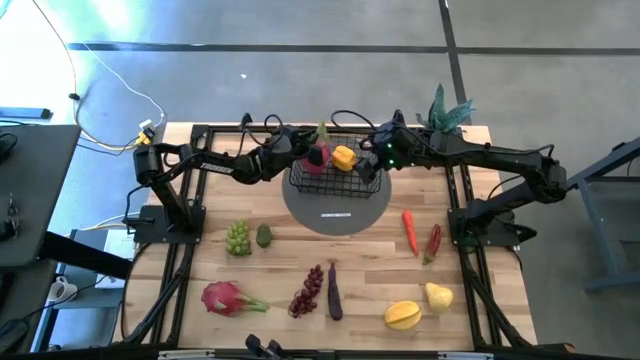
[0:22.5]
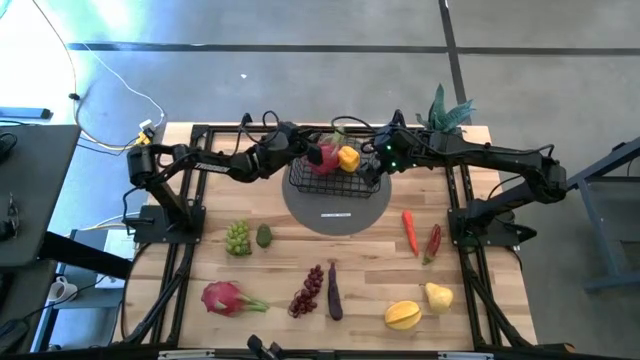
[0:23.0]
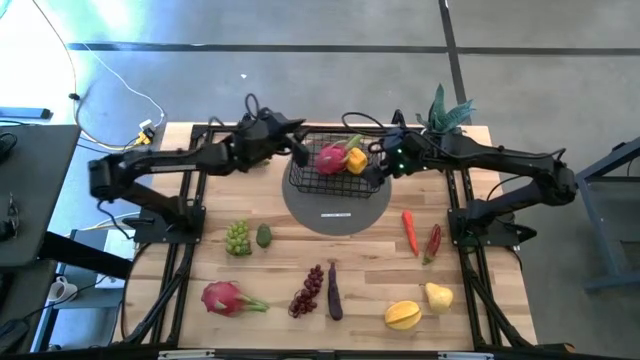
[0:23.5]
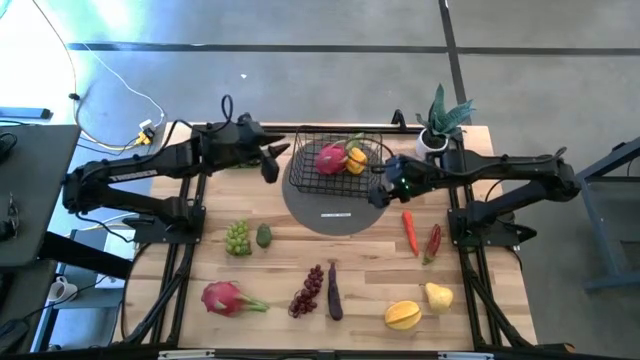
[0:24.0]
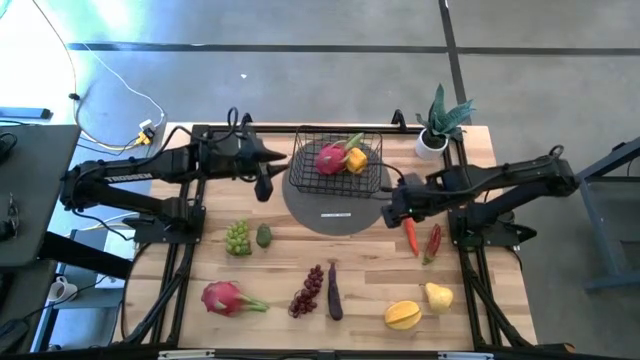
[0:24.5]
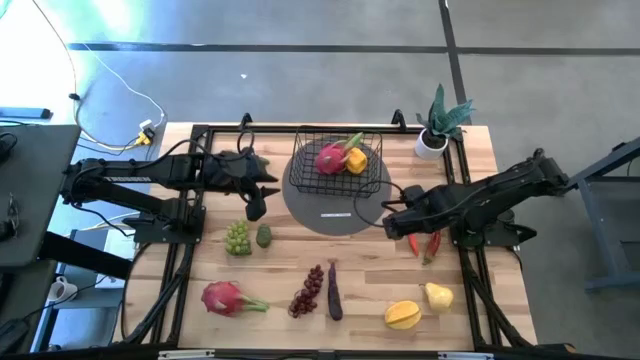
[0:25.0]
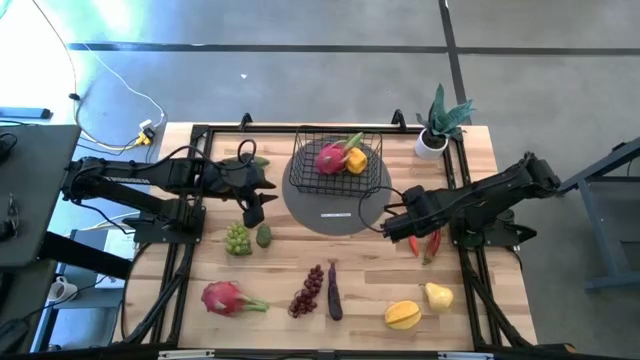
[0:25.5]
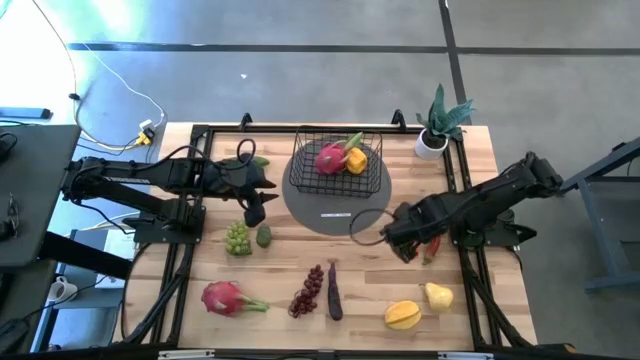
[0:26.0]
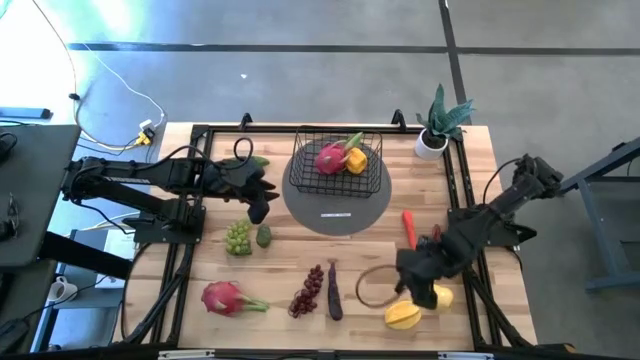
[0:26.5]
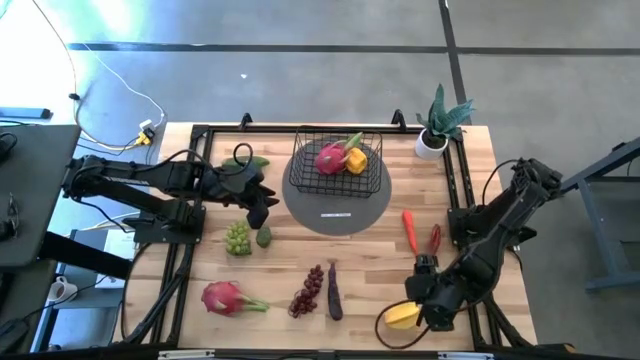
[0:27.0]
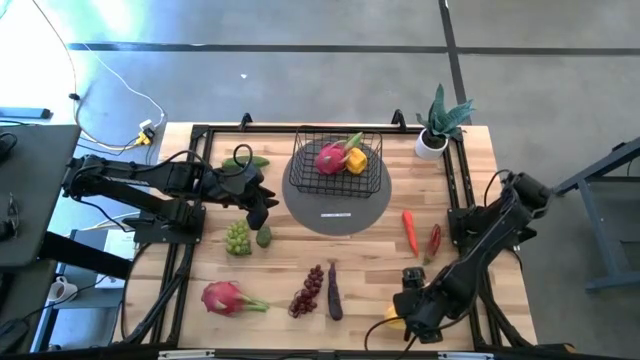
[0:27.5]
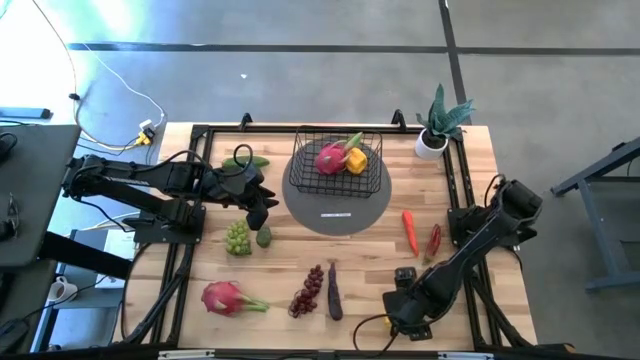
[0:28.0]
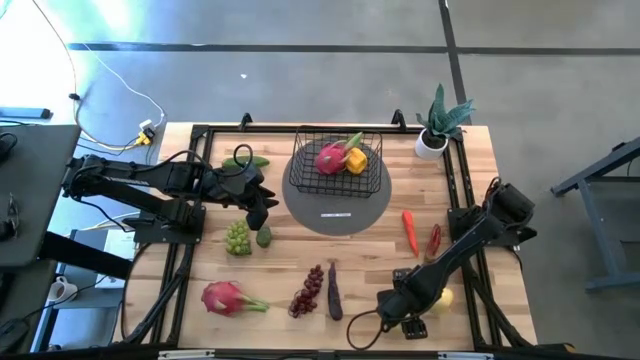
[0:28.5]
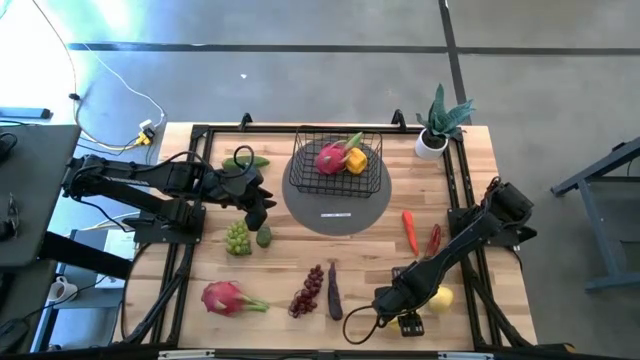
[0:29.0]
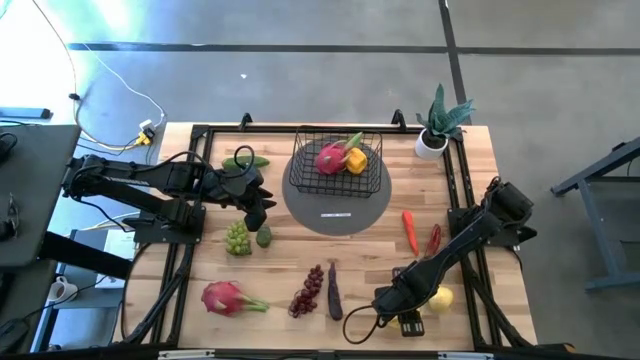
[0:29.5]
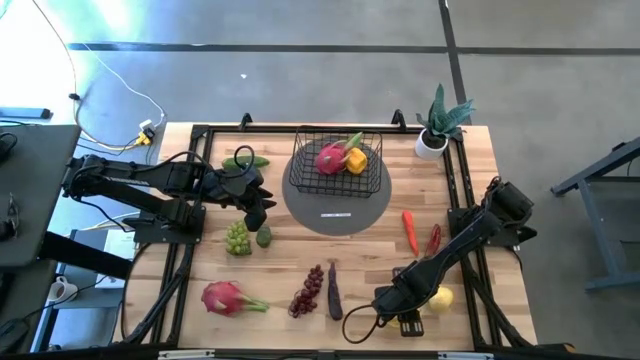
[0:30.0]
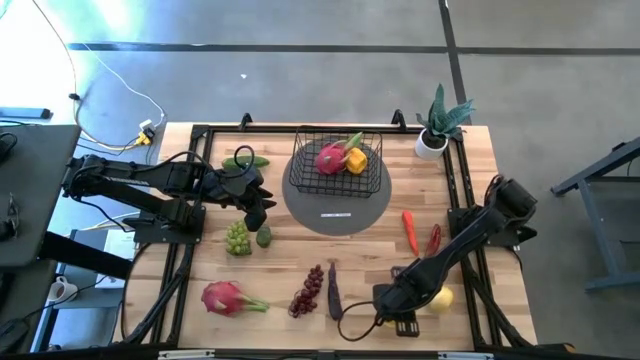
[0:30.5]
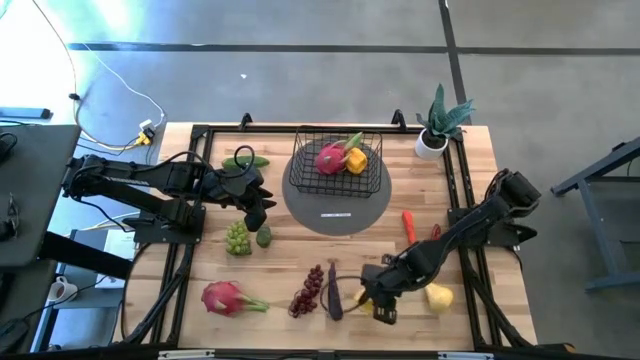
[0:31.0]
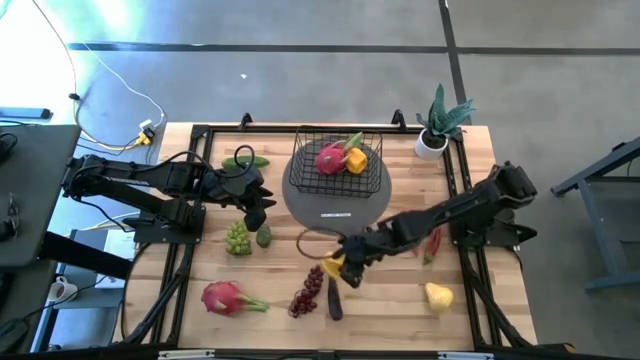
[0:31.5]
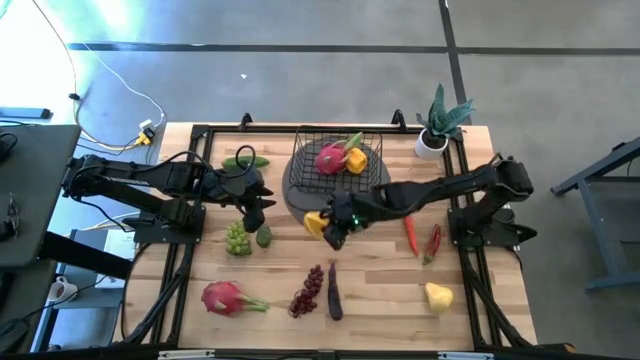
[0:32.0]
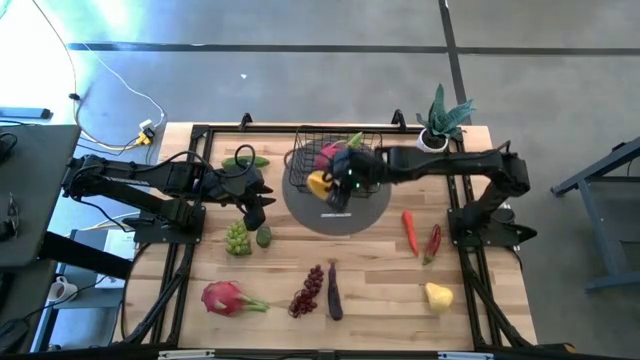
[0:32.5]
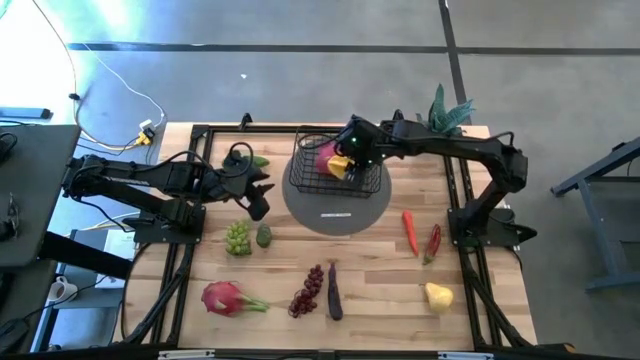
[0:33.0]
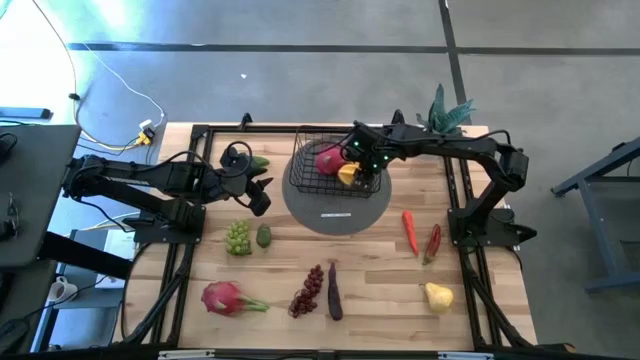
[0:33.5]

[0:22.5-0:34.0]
Task: Build produce basket
Put the star fruit into the wire basket

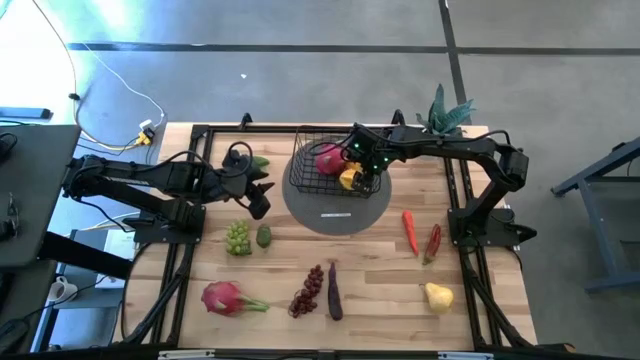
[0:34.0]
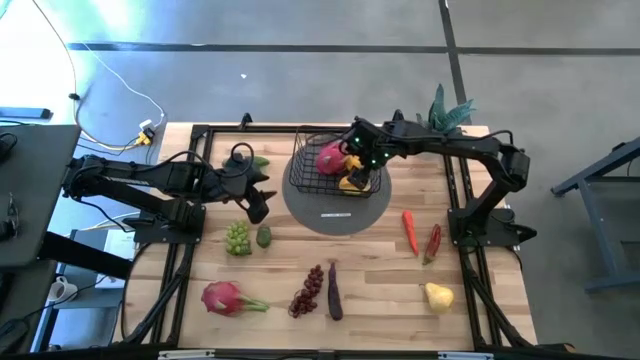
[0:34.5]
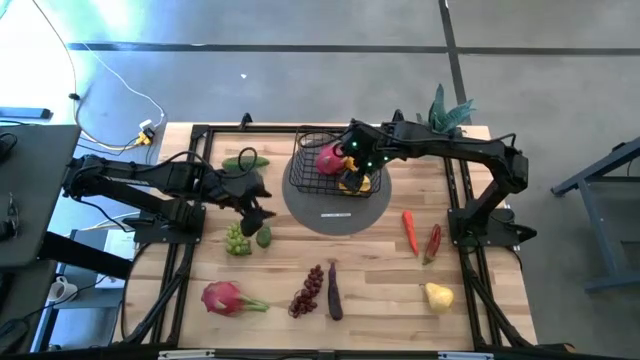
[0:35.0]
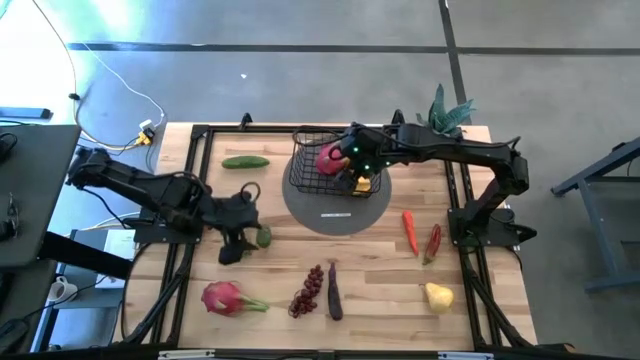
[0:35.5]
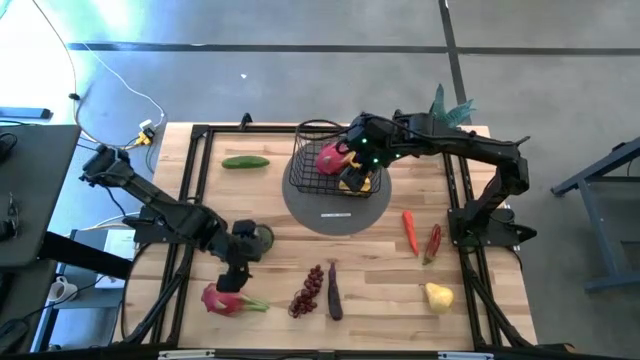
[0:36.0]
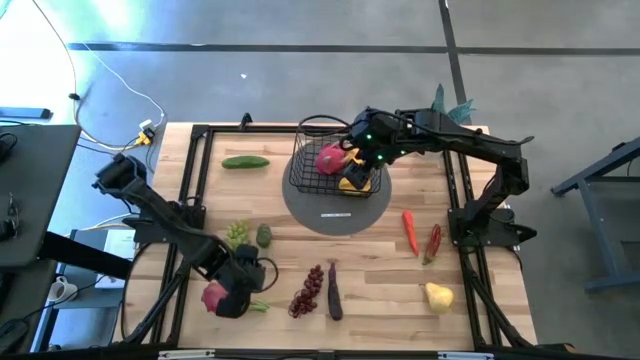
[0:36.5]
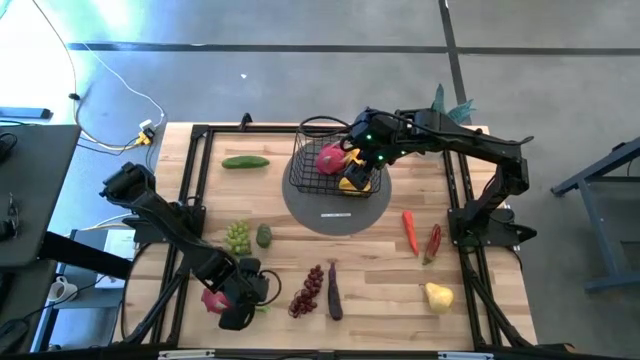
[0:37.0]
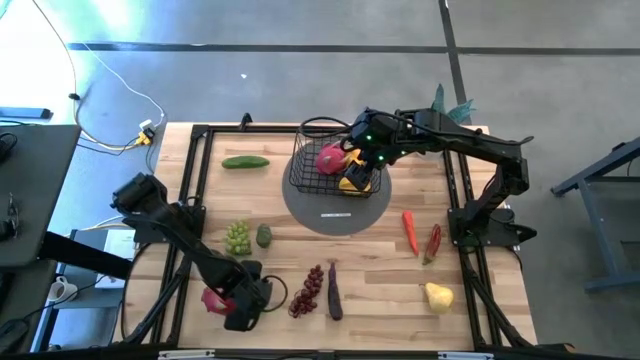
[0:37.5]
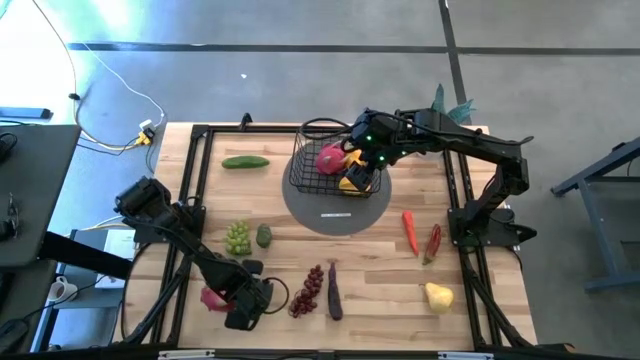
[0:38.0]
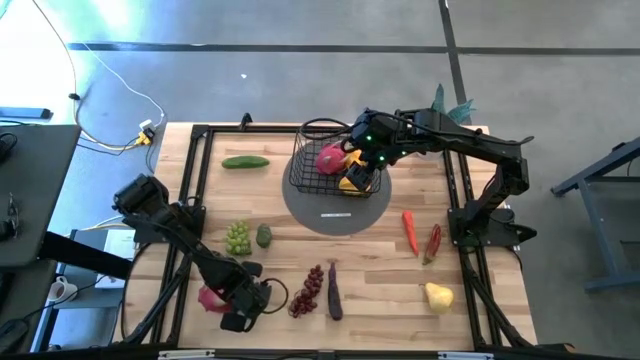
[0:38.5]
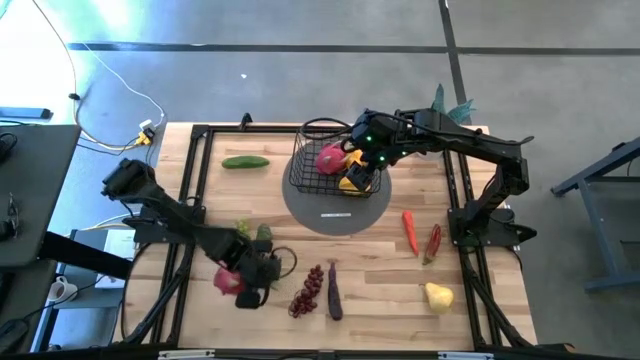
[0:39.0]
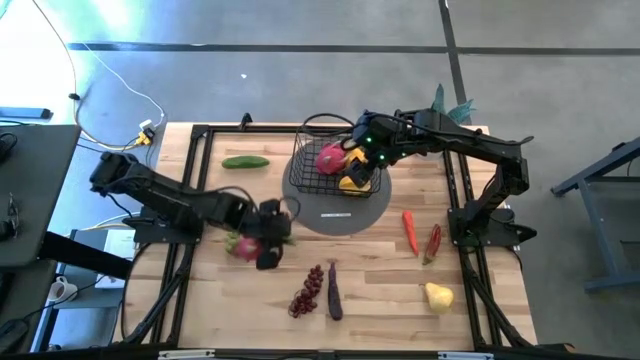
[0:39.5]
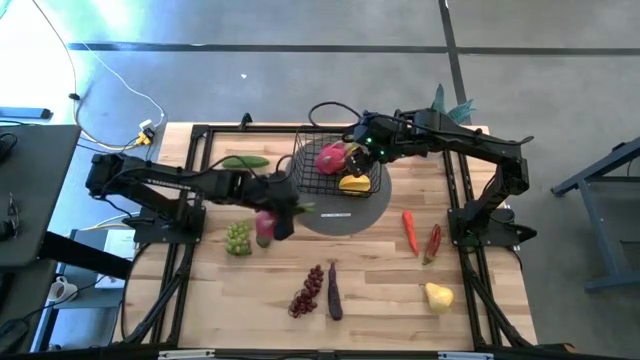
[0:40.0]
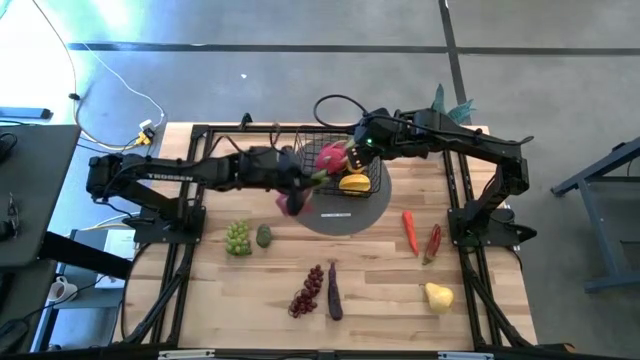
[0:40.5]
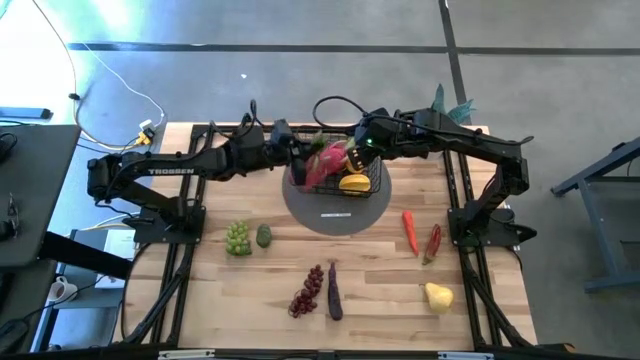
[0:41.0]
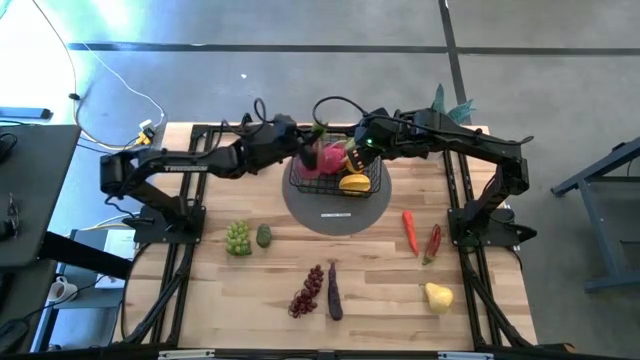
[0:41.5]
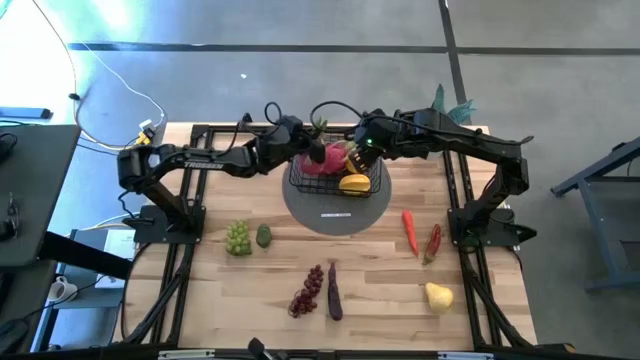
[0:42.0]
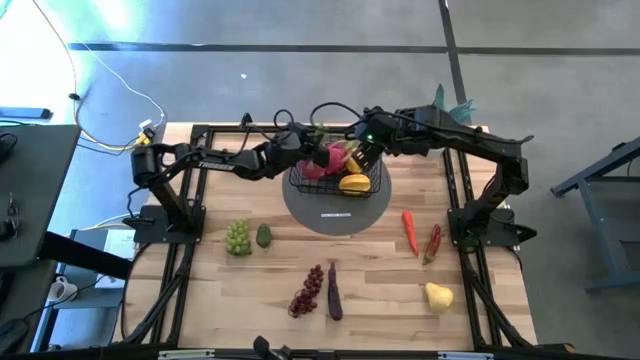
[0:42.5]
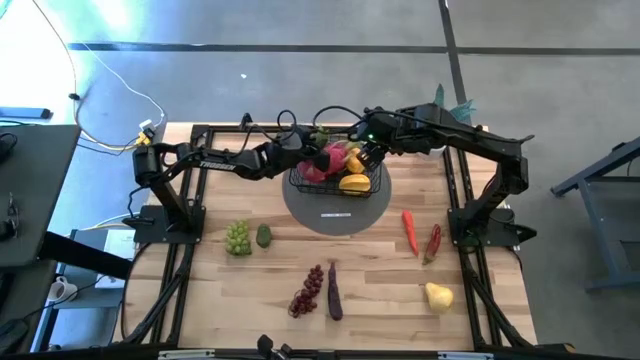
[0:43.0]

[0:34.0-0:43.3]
Put the dragon fruit into the wire basket

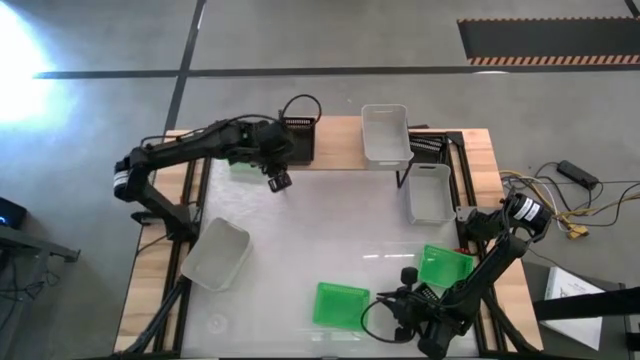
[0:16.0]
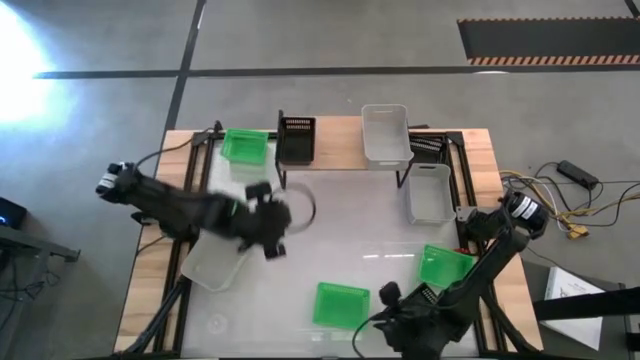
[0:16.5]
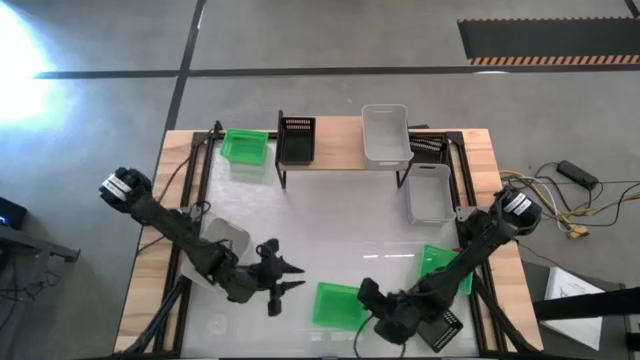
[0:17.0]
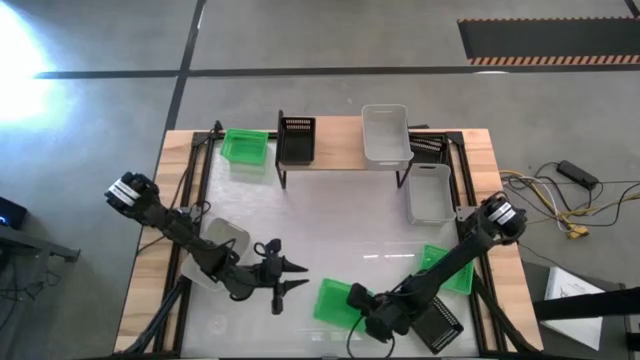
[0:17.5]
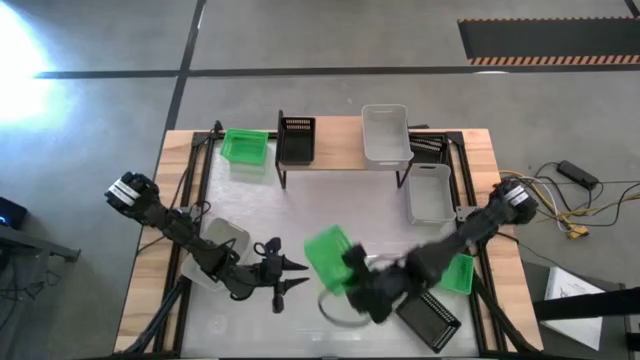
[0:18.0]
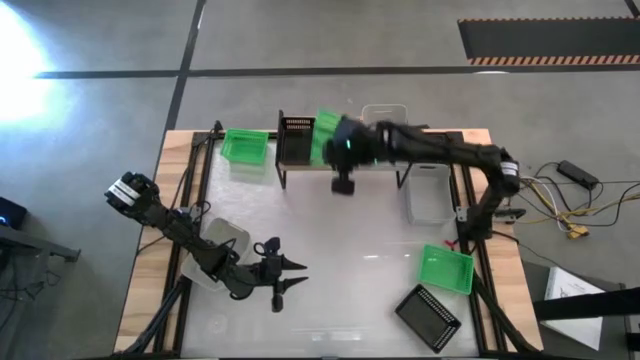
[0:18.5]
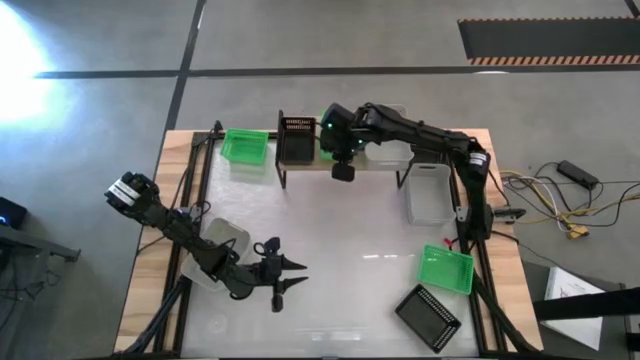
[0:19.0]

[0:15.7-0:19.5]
Task: Stack baskets on shelf by color
Put the bottom left green bin on the shelf
